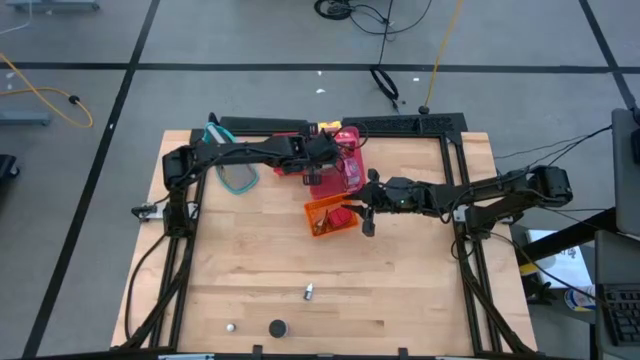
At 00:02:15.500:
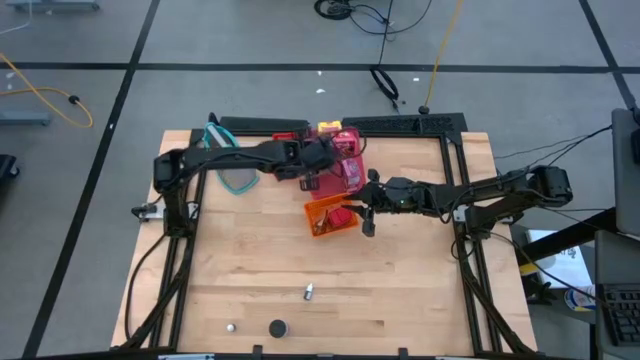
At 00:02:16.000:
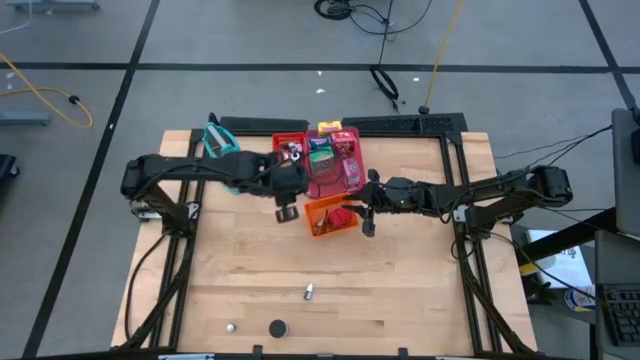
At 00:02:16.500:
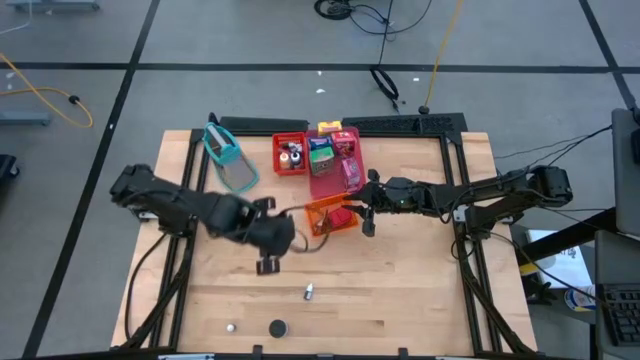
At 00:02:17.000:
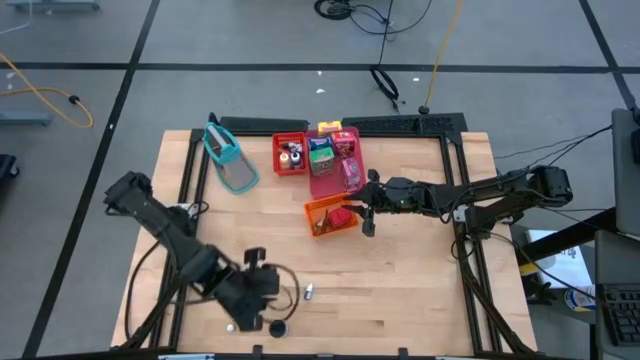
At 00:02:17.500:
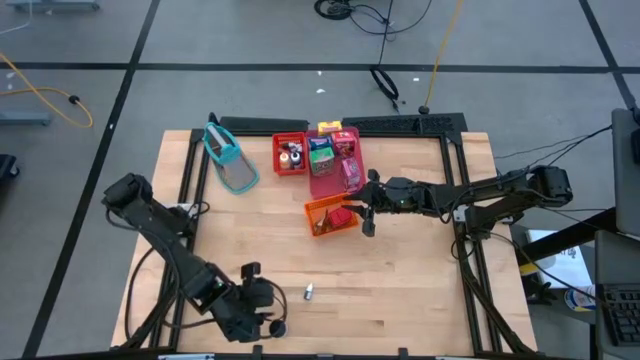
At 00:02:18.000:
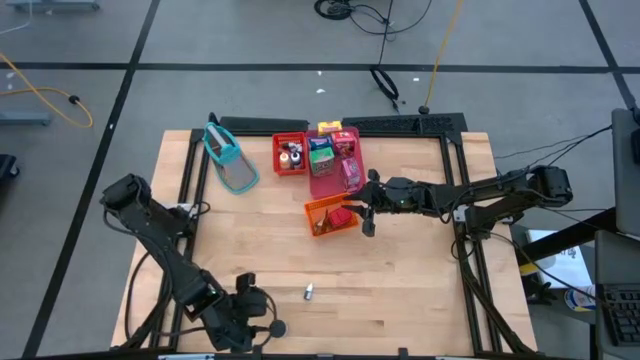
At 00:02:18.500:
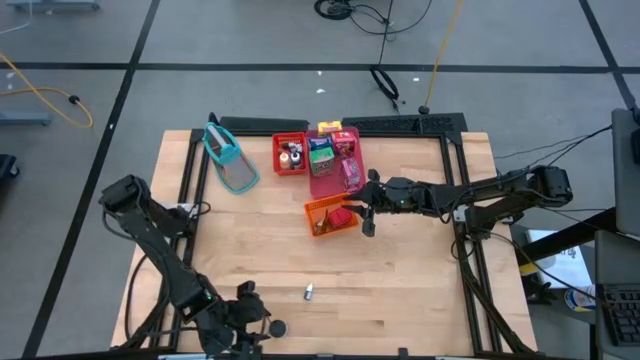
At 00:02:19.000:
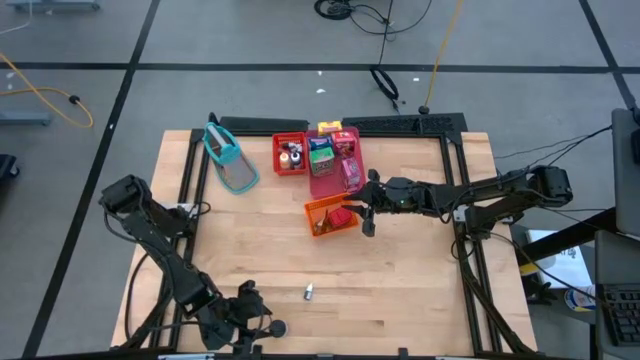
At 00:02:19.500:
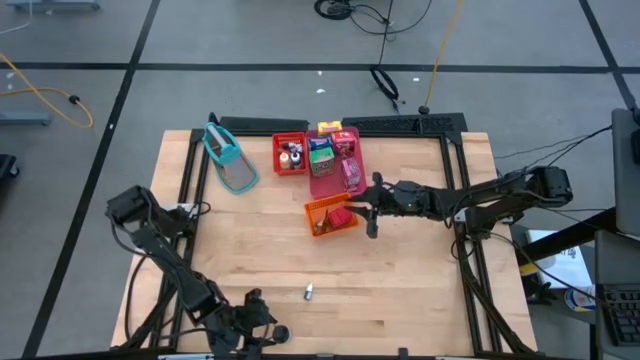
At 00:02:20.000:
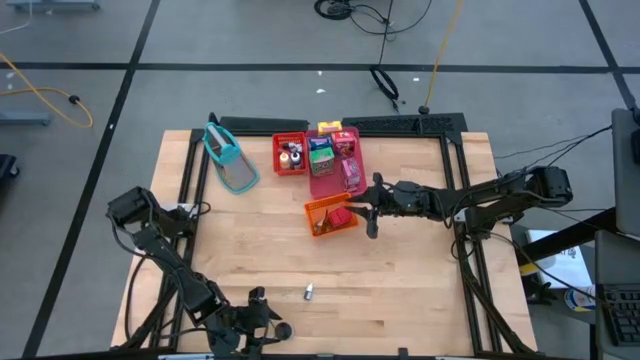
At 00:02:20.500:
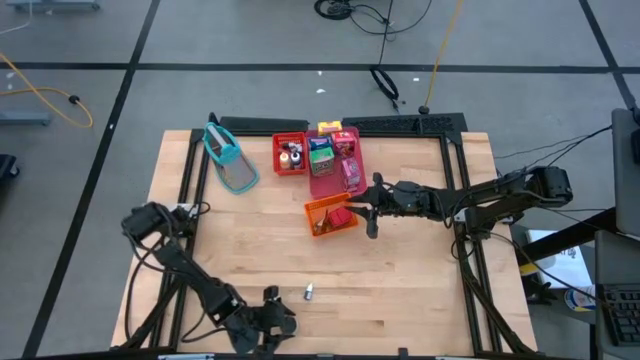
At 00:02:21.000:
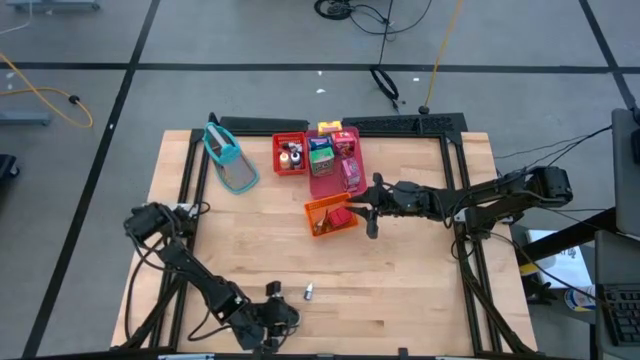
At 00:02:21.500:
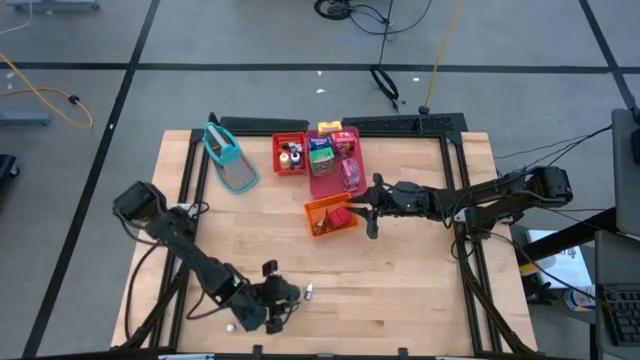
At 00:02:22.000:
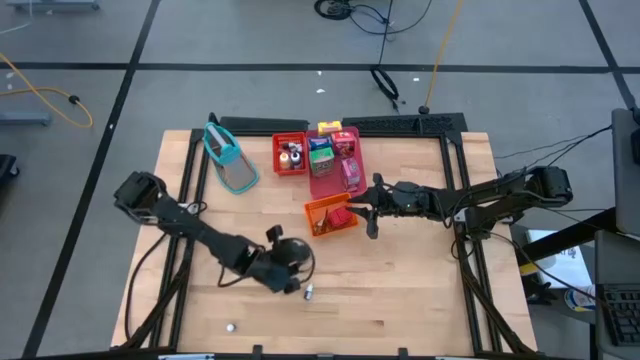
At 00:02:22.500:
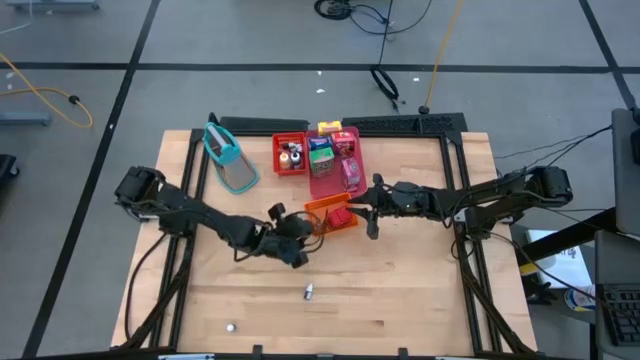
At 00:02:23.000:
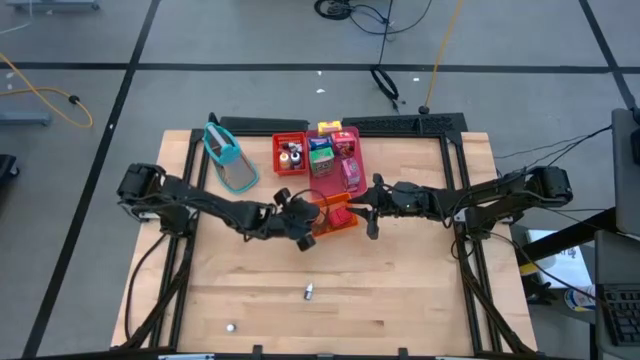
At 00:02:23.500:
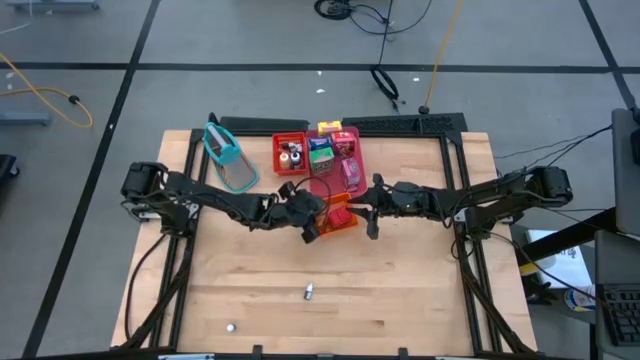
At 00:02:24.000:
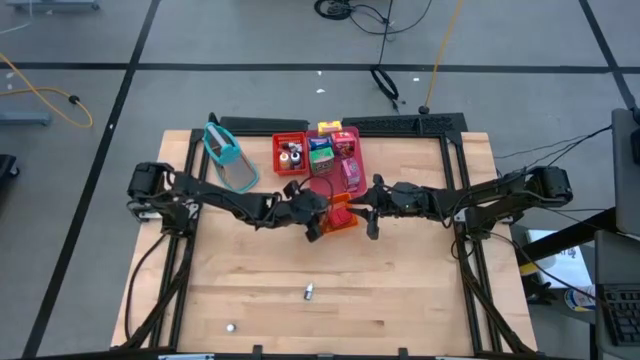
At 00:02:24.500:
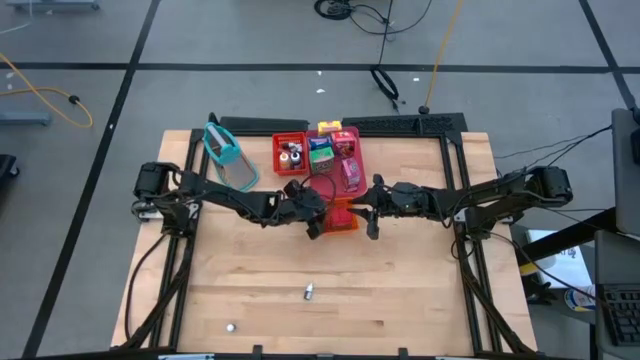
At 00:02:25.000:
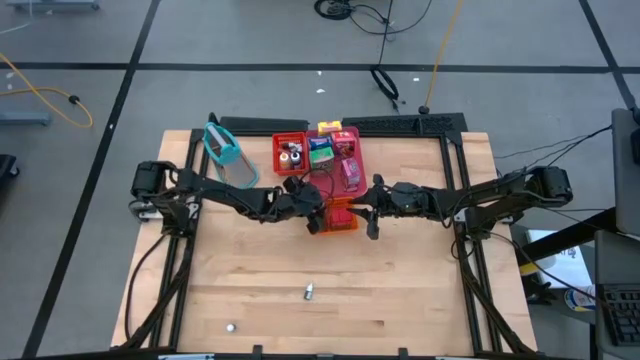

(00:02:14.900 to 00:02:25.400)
Task: Pick & Place Kitchen Items
Put the purple spice bottle into the orange bin

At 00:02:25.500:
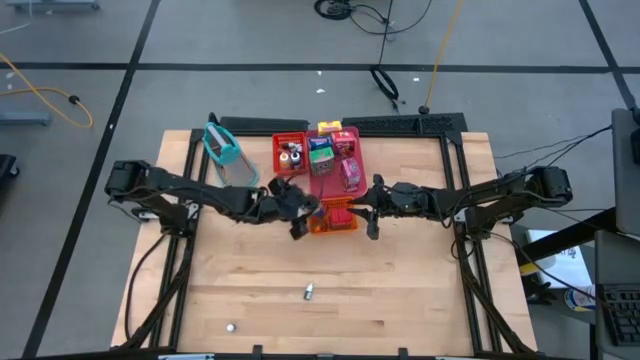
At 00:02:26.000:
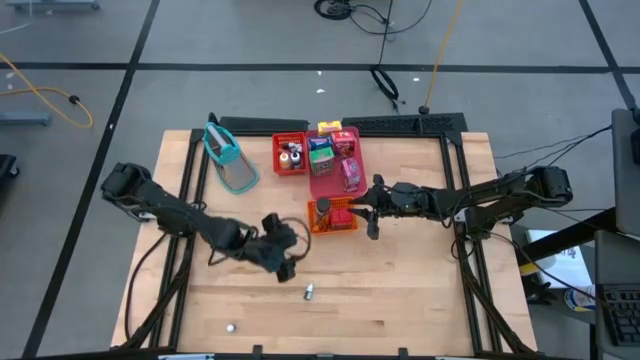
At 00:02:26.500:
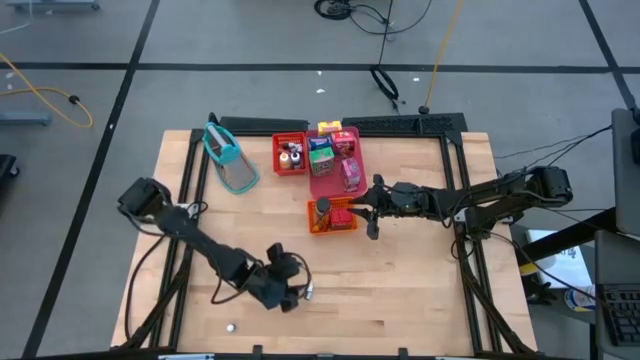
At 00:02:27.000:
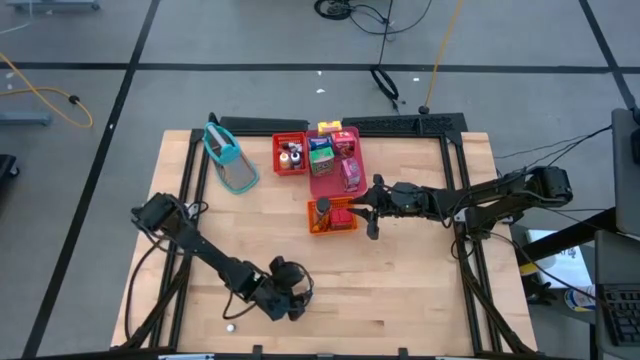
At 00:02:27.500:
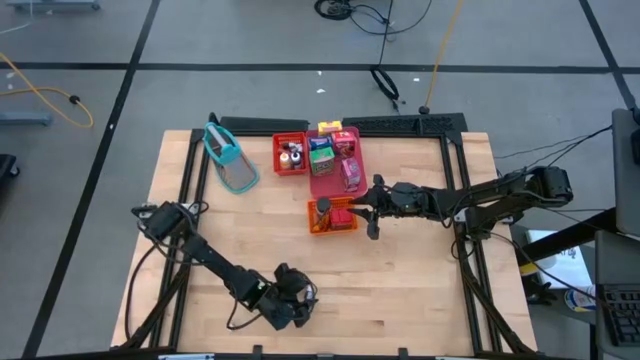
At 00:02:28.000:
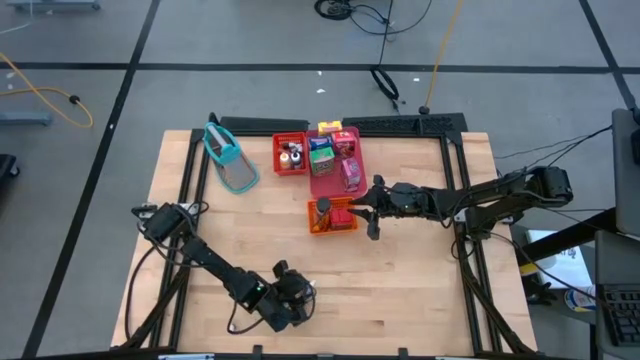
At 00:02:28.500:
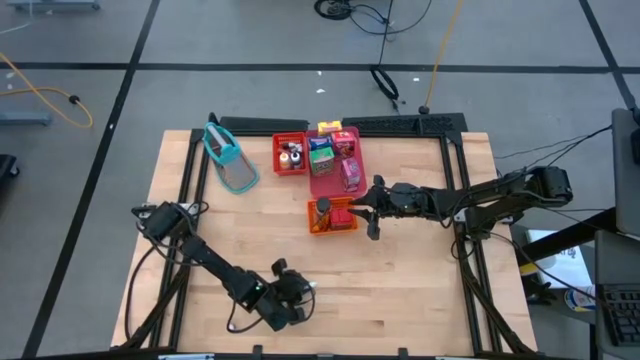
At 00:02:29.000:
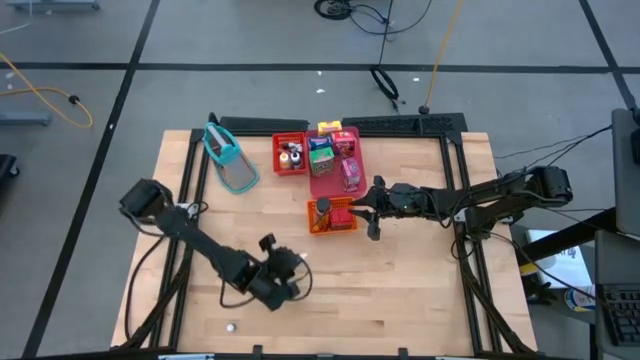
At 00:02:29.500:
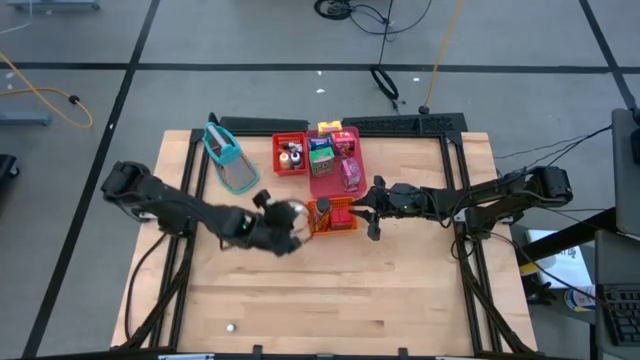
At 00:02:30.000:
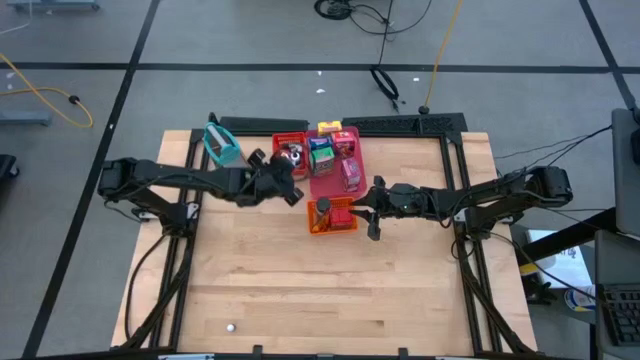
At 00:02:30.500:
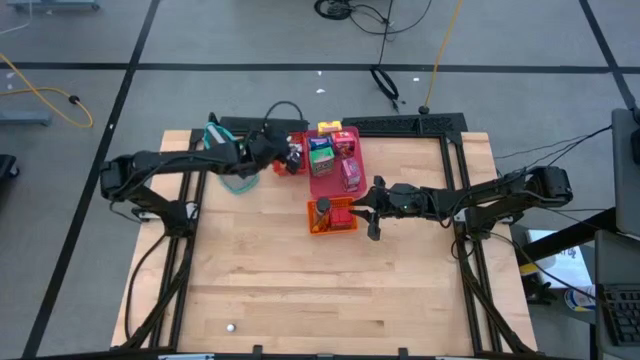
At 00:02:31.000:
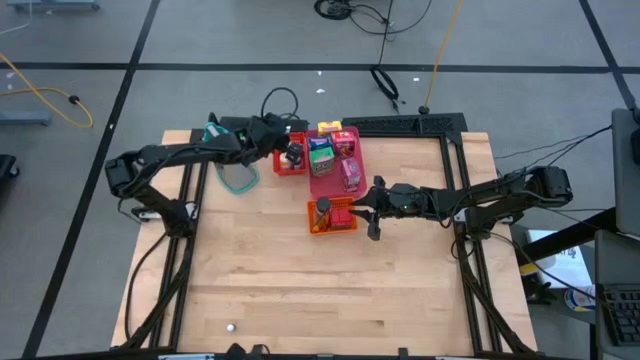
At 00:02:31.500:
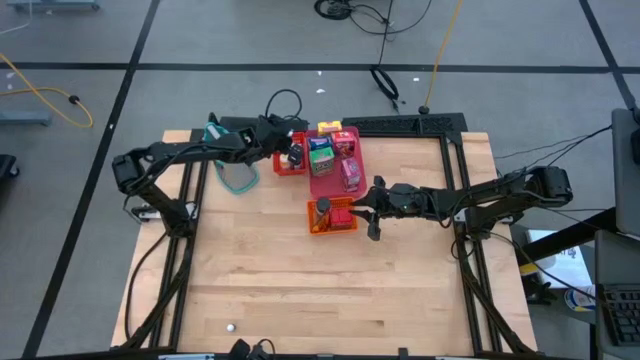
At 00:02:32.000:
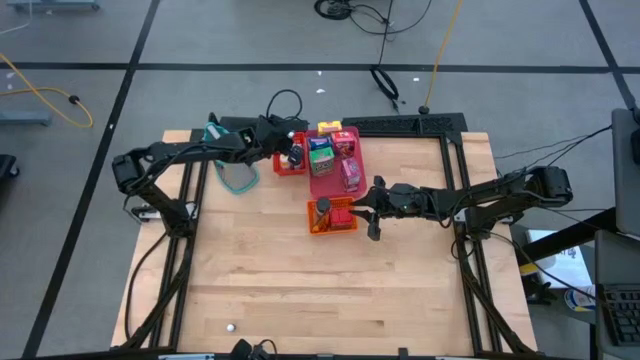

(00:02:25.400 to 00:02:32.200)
Put the brown food coloring bottle into the red bin

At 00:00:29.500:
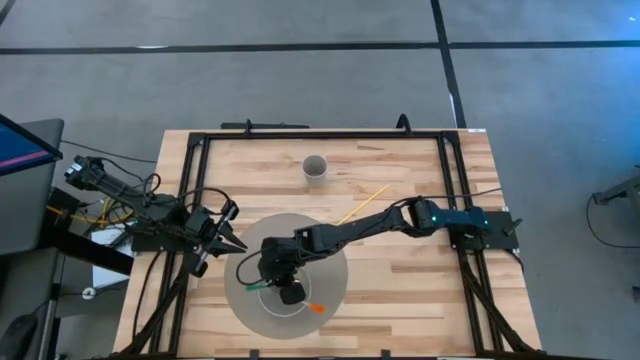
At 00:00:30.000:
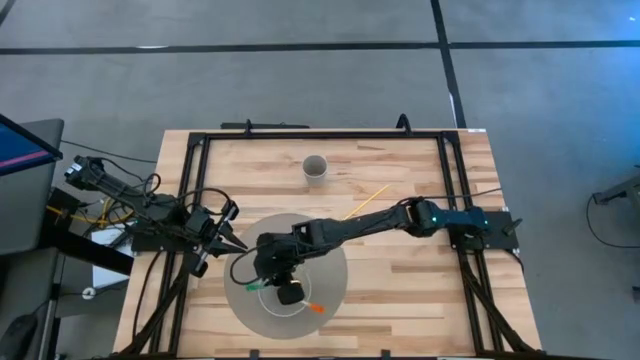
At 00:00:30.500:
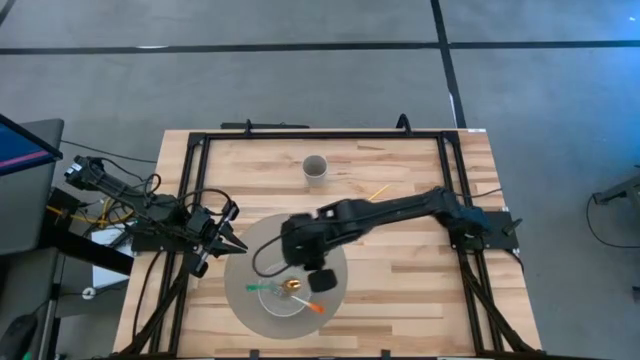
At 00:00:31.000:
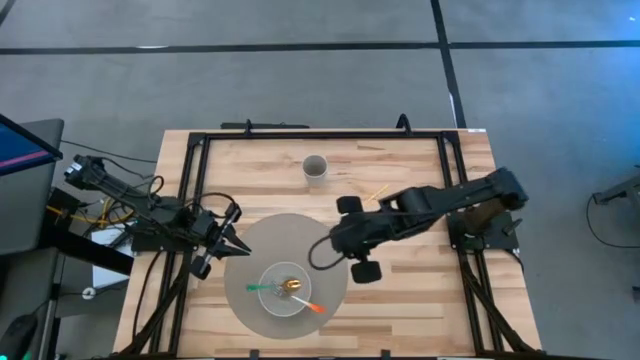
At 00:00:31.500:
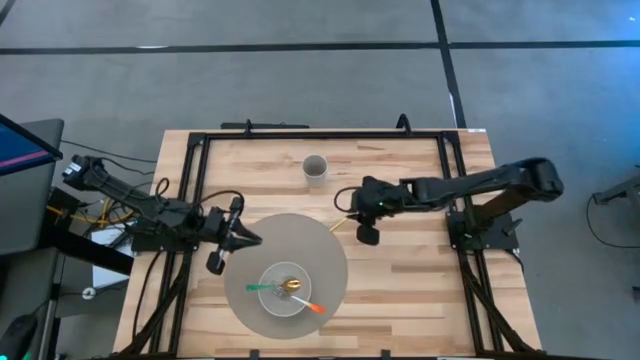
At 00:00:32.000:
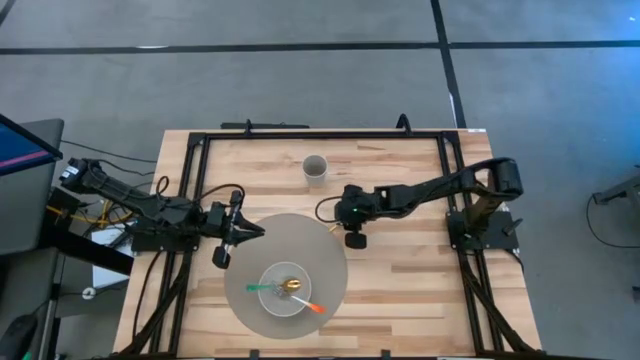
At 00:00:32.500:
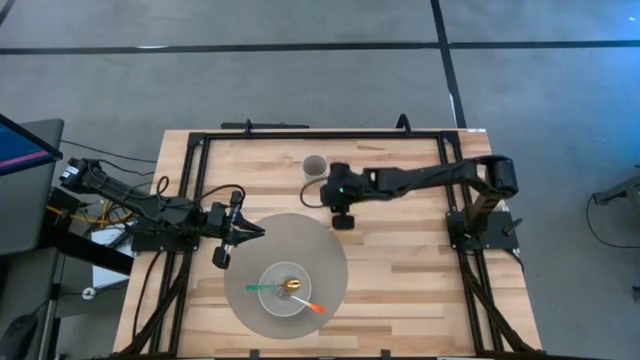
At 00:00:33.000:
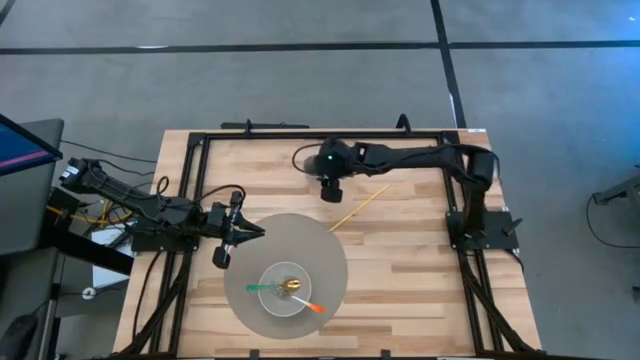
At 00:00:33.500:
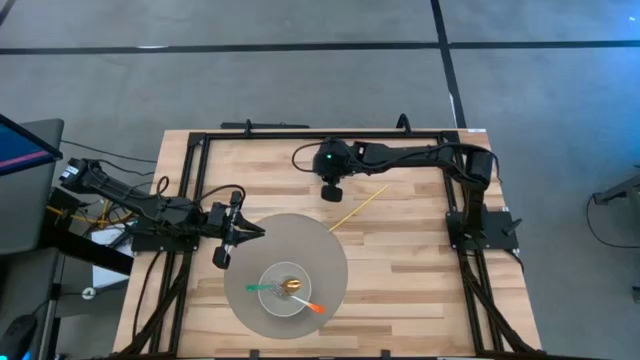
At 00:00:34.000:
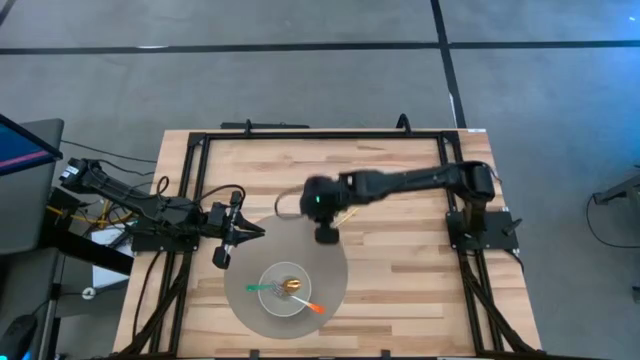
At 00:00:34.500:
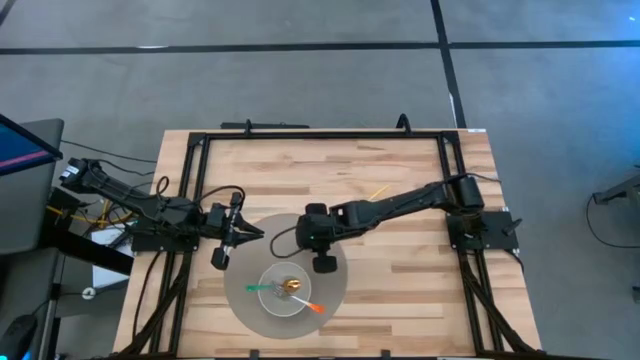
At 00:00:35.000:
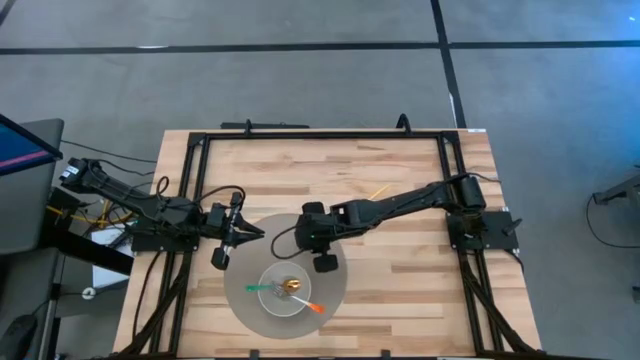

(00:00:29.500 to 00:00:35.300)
Task: Pick & Place Utensil
Put the white cup on the gray mat to the top right of the white bowl
